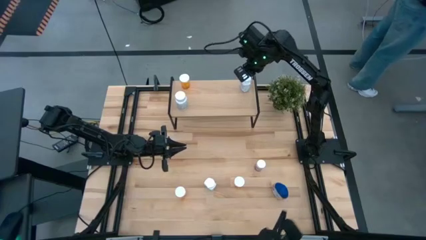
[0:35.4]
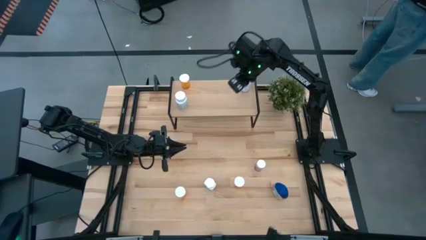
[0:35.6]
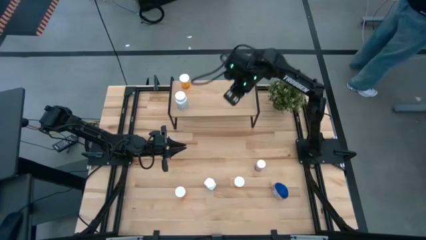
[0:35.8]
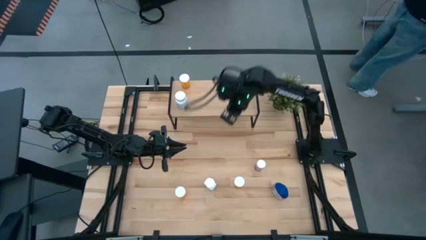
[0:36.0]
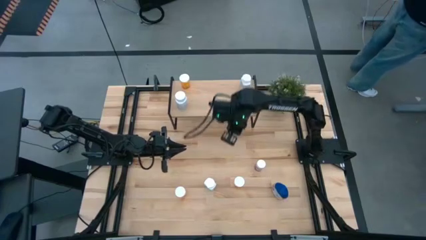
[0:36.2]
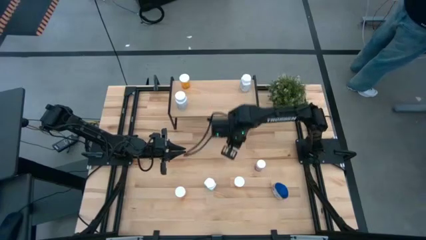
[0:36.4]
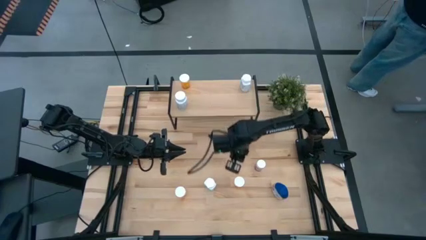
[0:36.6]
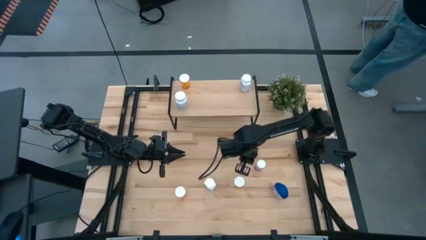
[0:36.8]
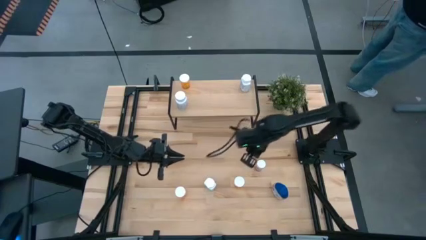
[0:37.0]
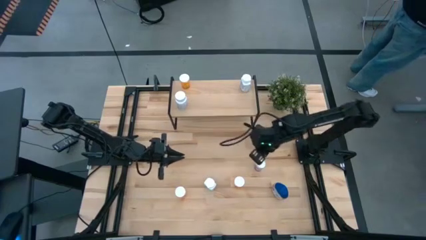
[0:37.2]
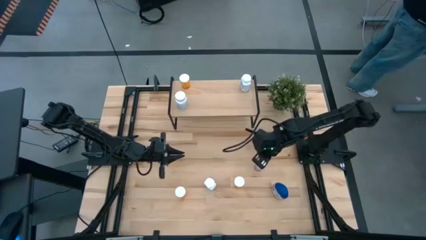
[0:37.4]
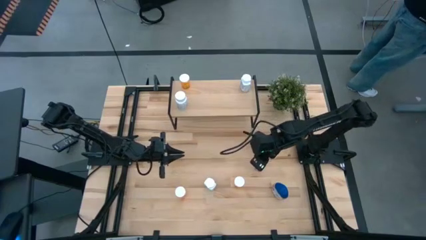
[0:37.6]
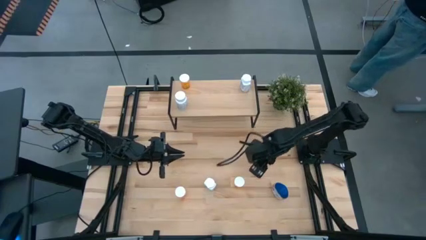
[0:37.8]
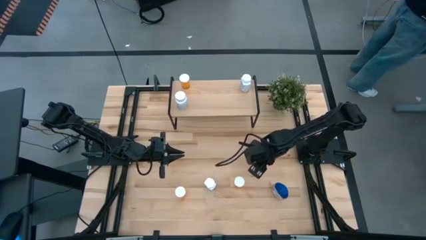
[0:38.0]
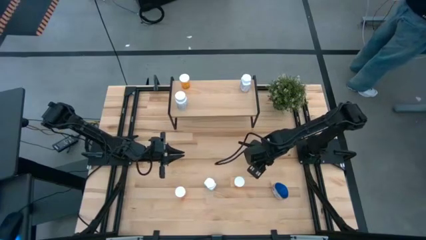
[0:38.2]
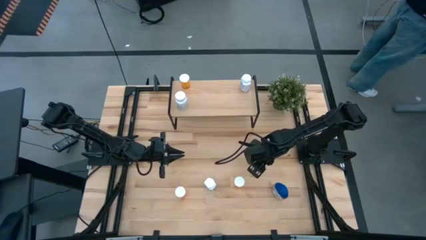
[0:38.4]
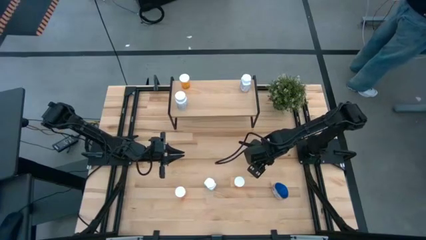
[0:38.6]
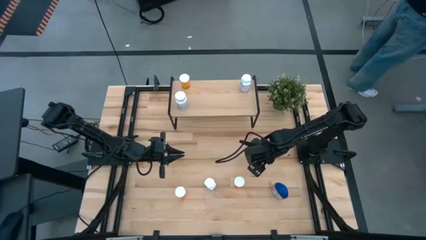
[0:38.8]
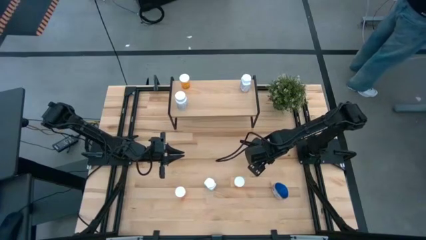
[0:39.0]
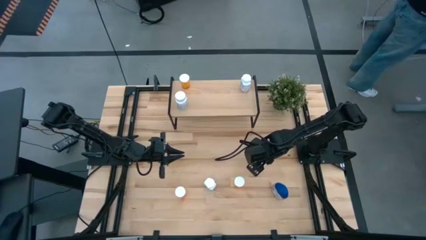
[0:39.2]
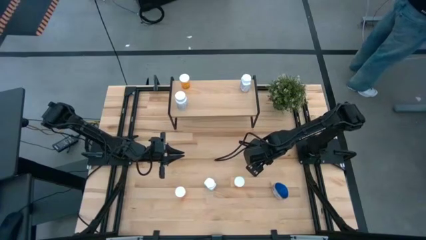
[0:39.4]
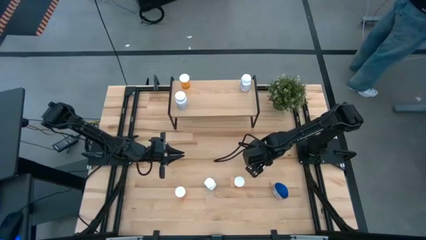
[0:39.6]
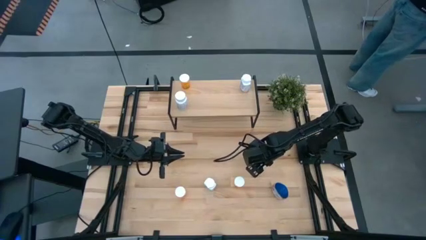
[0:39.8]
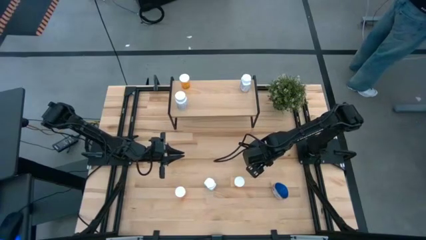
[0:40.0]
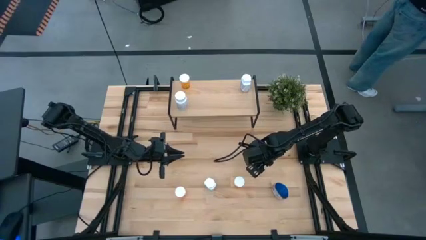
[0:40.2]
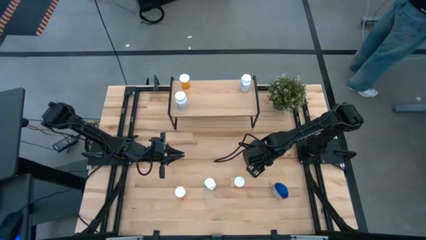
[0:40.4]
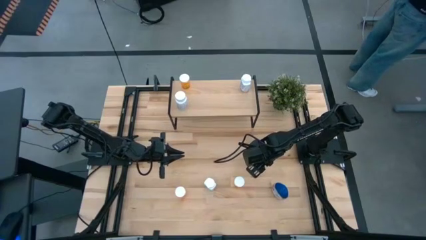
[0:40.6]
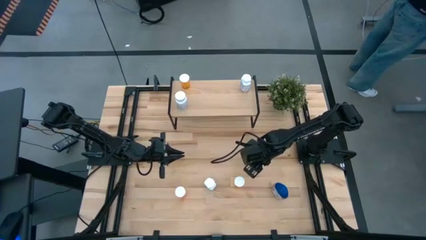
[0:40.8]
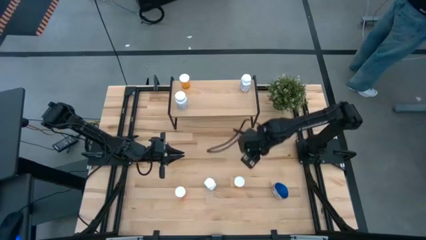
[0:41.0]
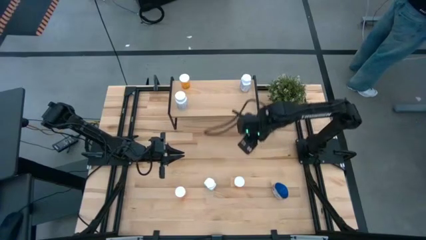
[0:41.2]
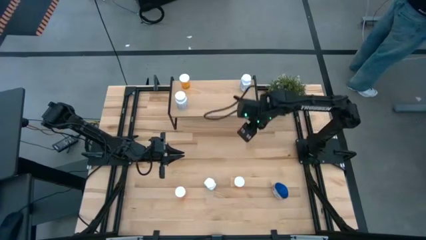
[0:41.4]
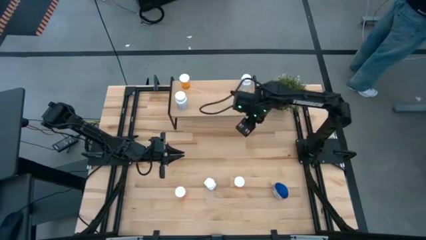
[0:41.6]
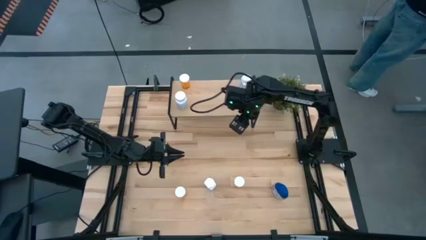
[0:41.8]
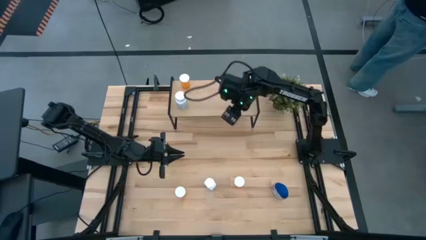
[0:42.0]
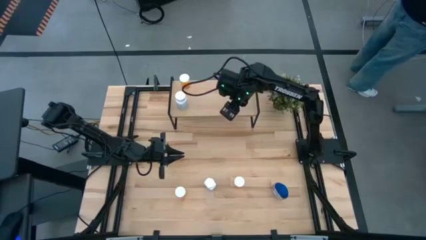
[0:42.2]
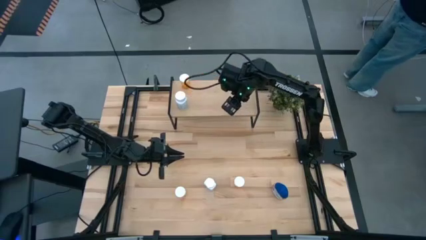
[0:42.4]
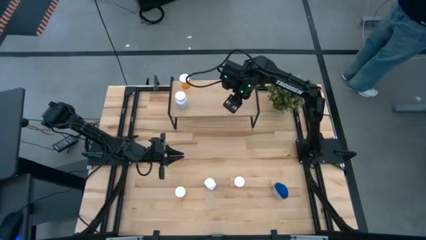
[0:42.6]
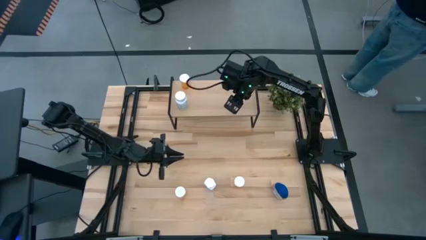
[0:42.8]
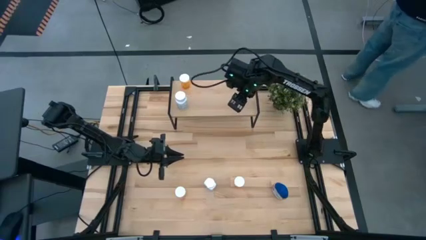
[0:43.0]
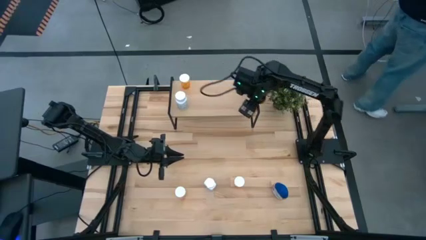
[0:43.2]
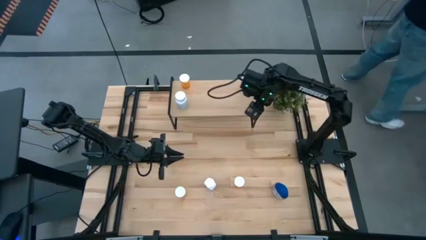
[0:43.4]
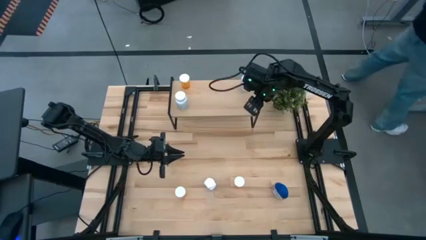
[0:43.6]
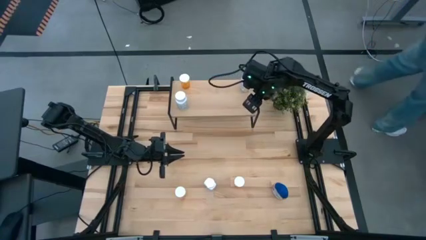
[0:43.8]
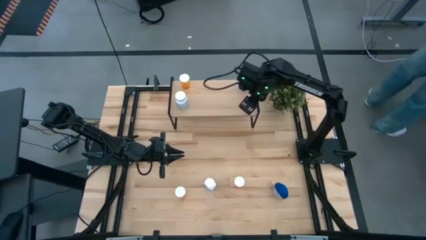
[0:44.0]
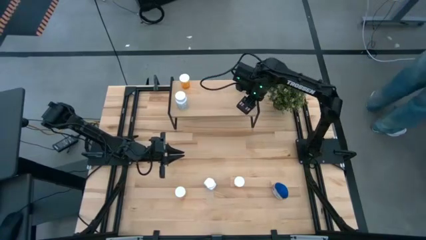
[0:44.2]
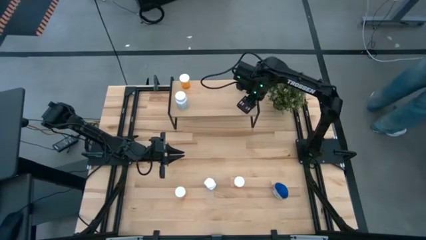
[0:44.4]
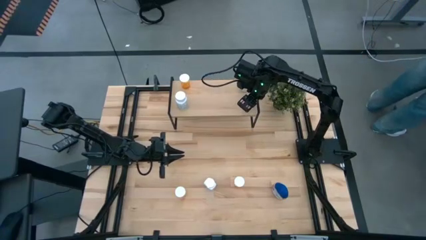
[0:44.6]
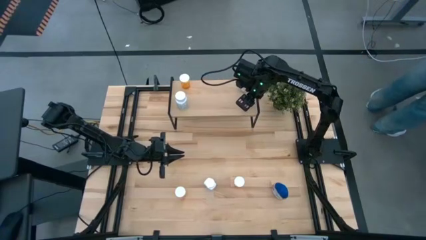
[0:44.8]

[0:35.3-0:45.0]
Task: Pick and place medicine bottles onto shelf by color
Put the pink pill bottle on the shelf

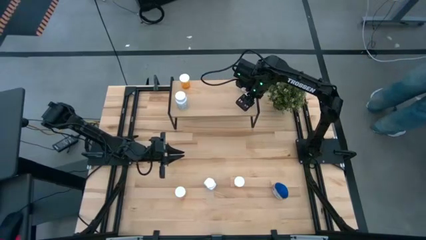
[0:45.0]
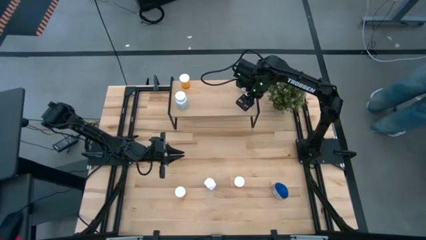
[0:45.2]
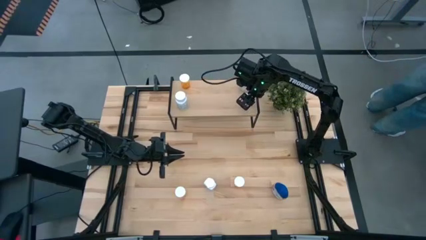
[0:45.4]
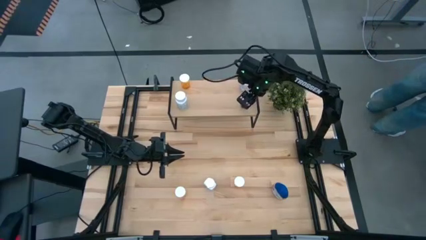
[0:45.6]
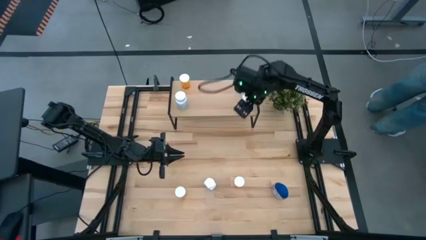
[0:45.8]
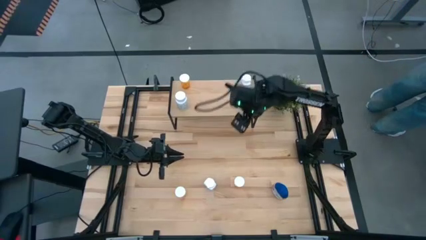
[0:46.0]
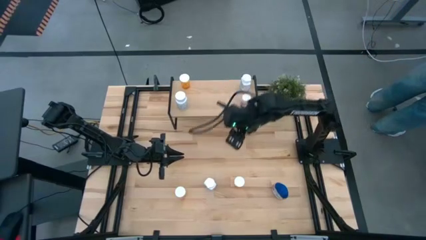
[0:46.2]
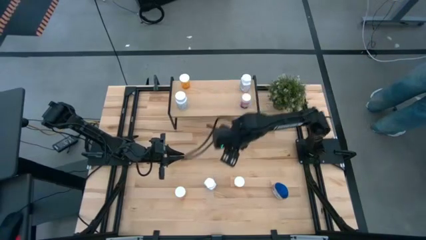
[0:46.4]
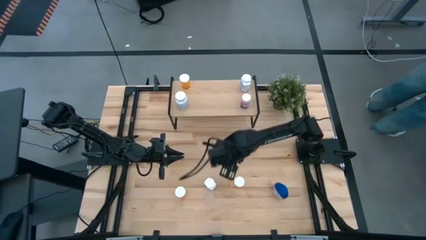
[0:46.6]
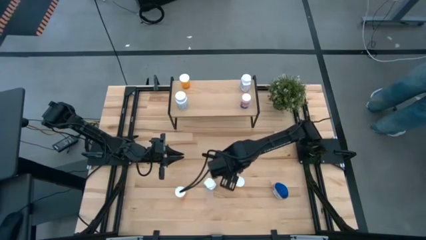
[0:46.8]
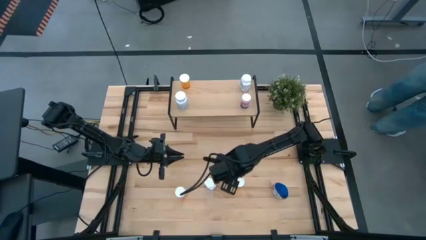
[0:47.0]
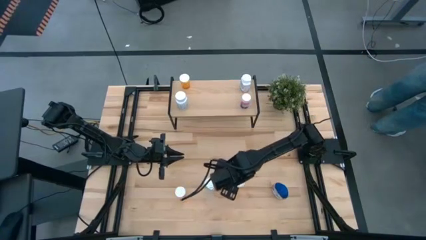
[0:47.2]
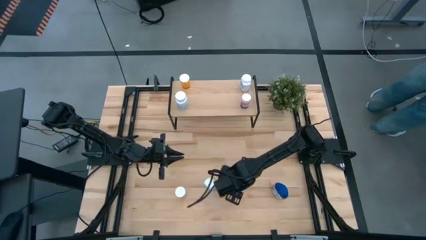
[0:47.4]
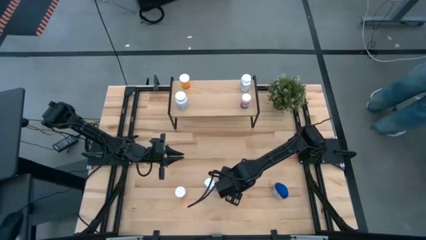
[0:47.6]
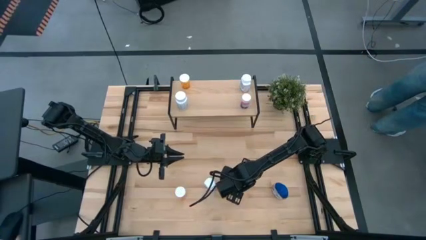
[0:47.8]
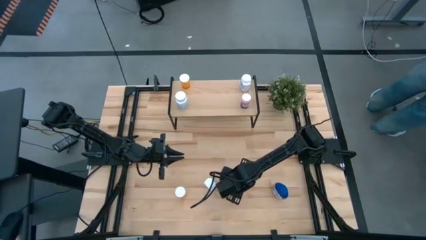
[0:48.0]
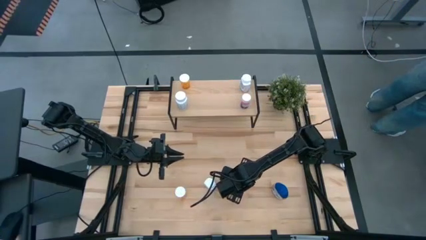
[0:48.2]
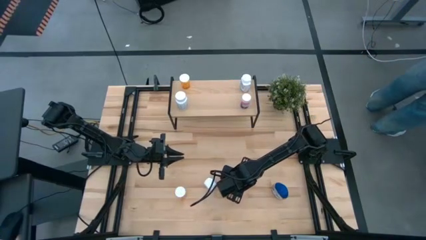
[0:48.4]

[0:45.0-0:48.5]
Put the right yellow pill bottle on the shelf

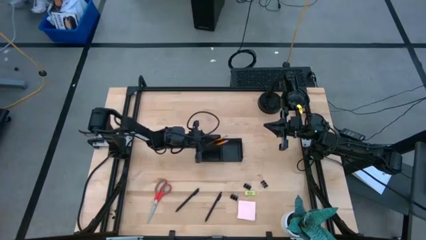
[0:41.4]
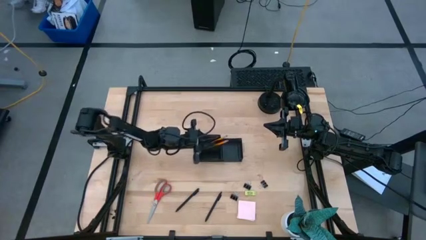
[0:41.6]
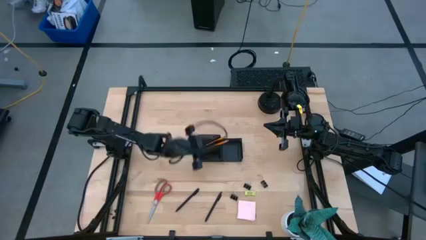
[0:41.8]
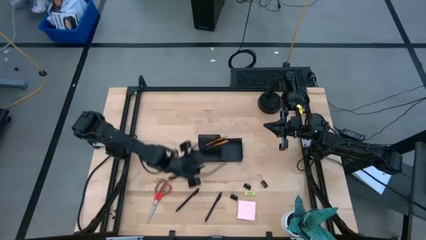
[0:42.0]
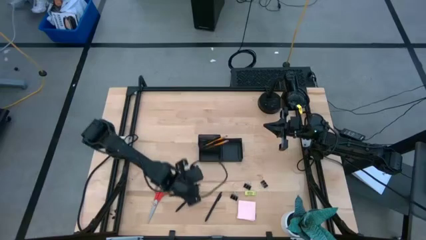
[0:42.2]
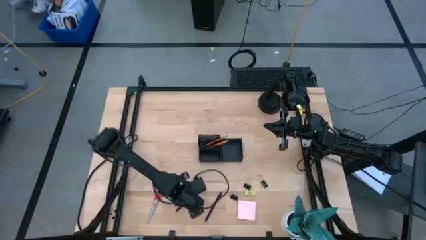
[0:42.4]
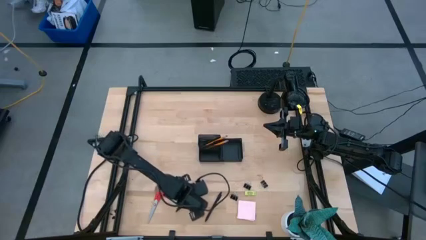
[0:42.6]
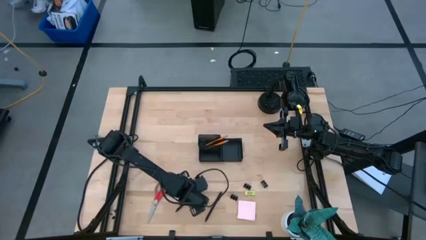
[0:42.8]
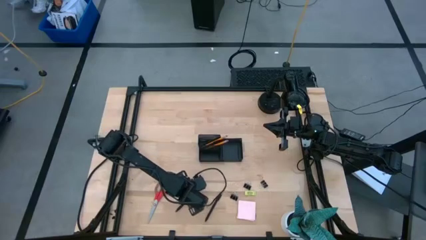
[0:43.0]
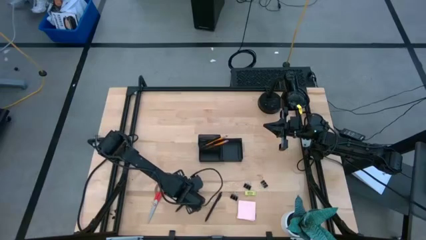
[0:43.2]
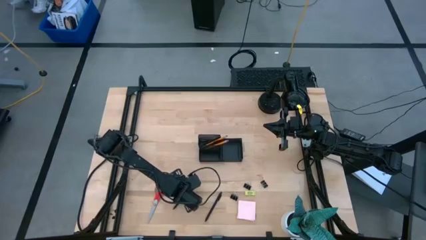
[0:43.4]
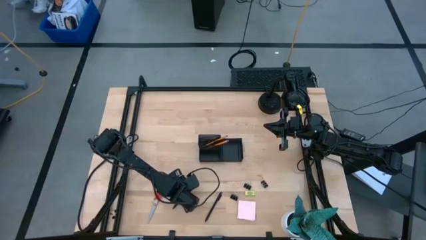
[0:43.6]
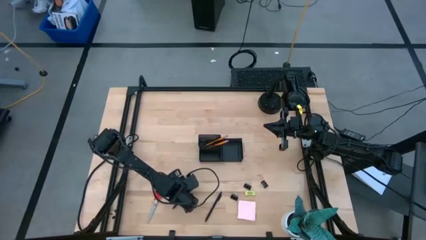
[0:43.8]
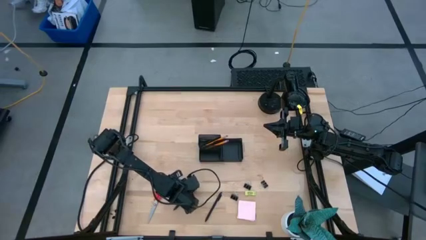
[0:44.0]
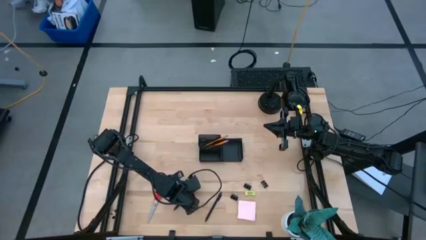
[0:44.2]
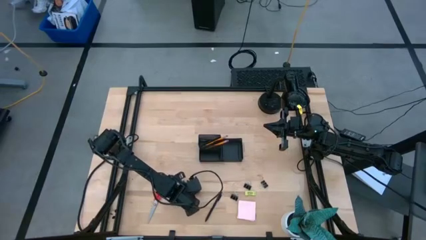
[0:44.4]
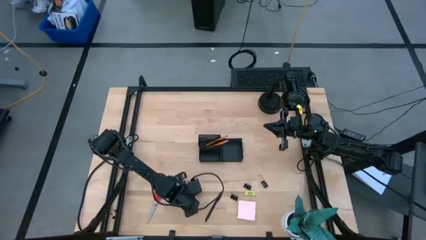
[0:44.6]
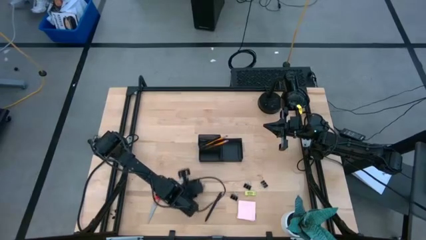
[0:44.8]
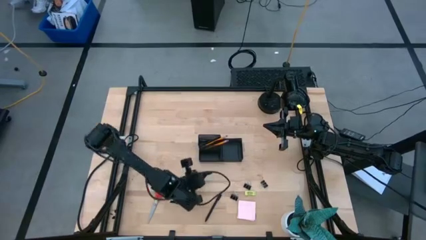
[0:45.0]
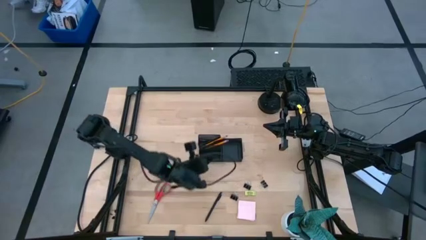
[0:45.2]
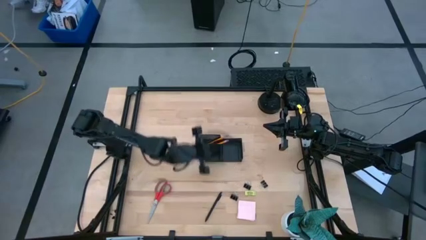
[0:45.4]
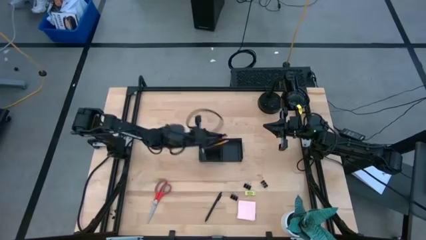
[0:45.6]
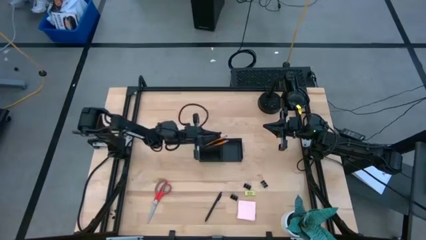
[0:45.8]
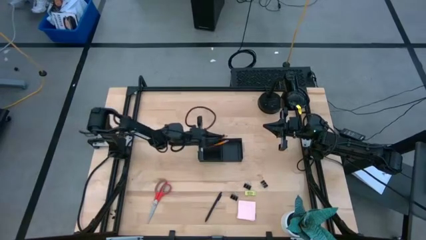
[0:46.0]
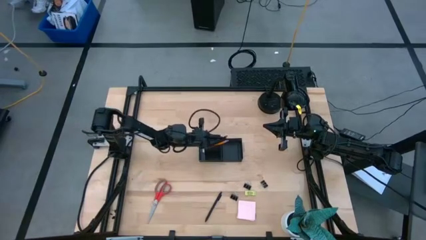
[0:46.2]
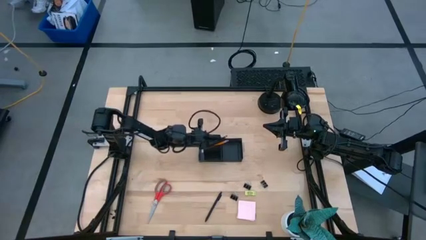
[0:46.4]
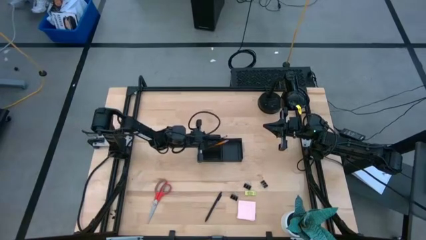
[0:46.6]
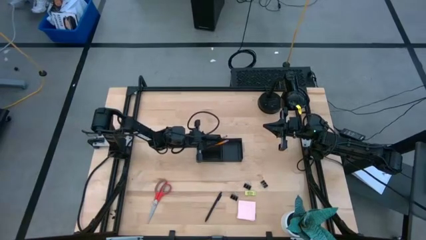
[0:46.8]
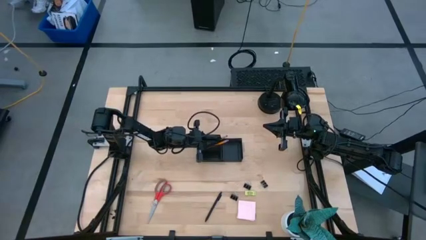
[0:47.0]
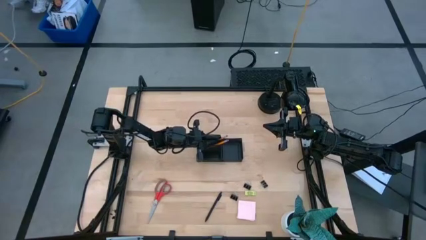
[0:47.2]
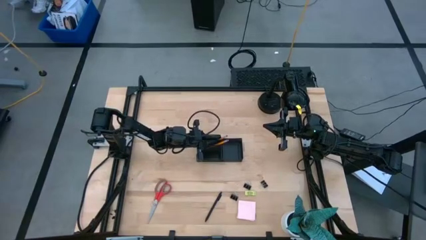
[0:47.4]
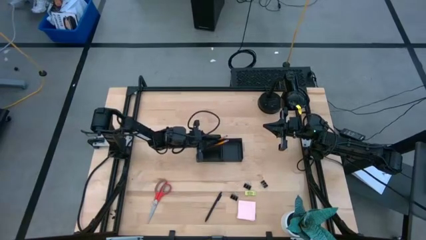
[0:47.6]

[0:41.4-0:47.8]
Task: Pick and place office supplies into organizer
Put the left pen into the top left section of the desk organizer
